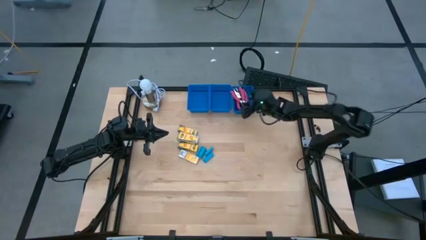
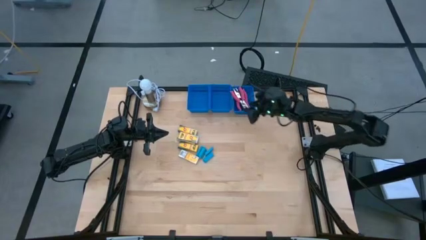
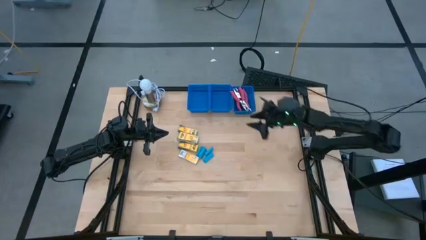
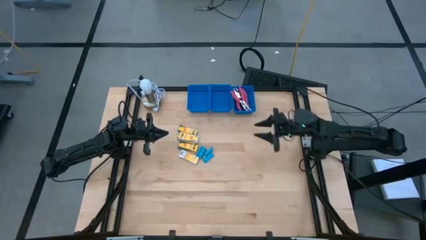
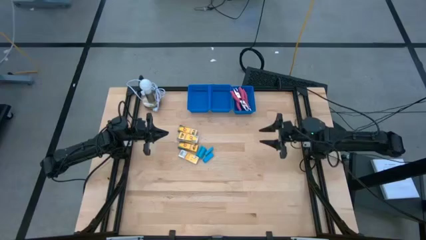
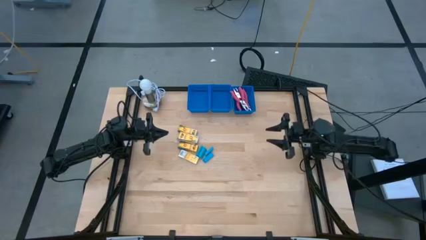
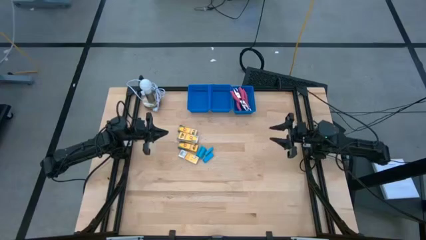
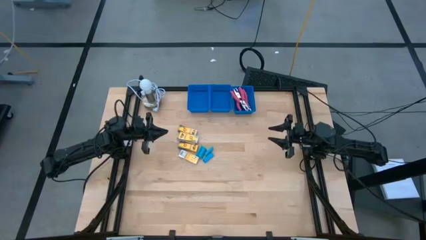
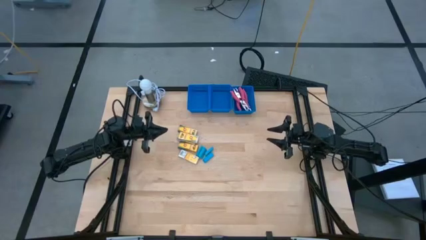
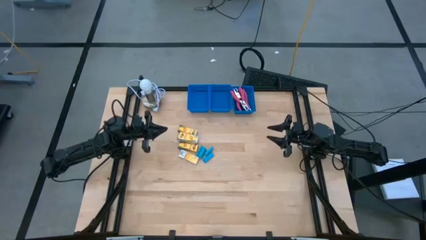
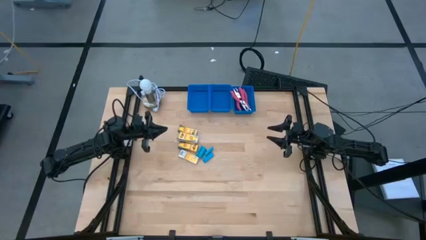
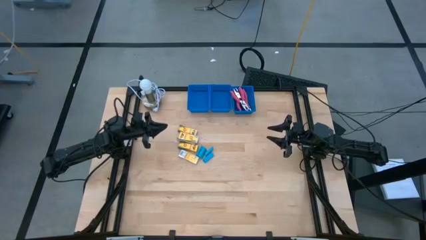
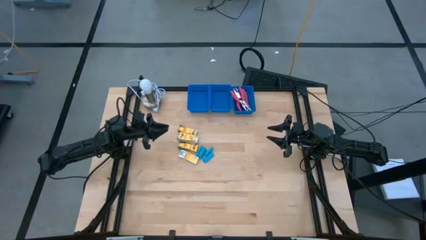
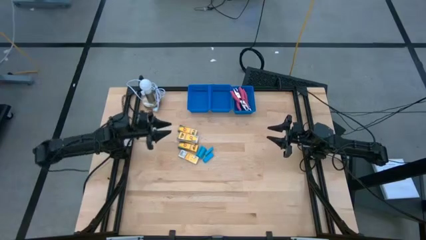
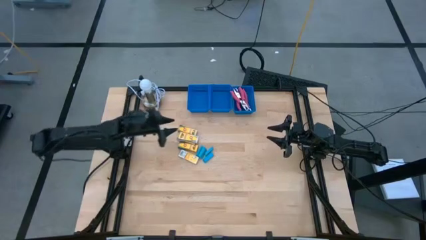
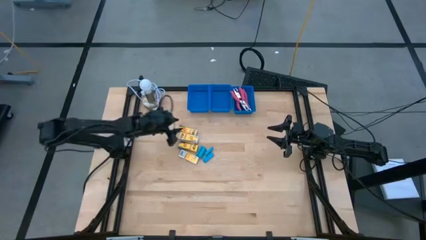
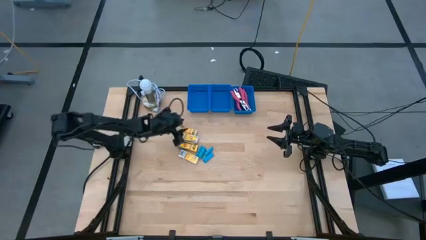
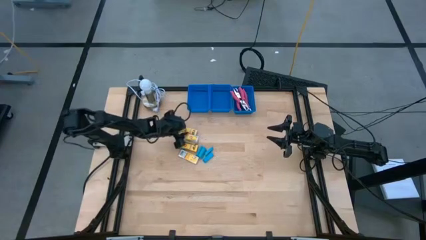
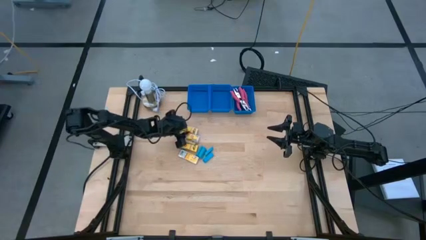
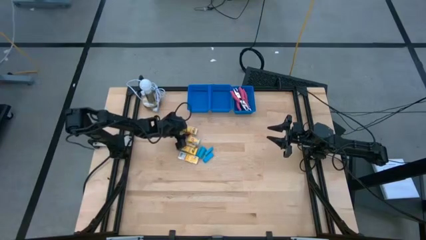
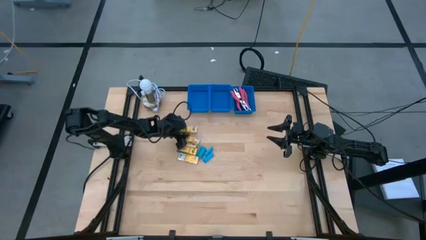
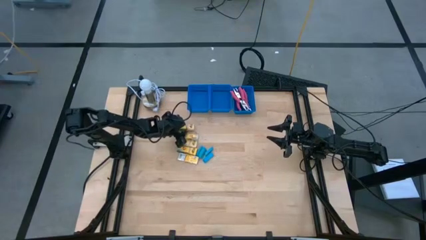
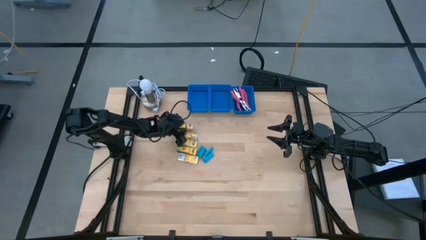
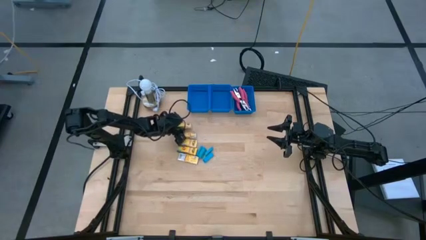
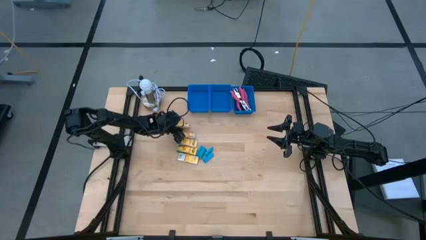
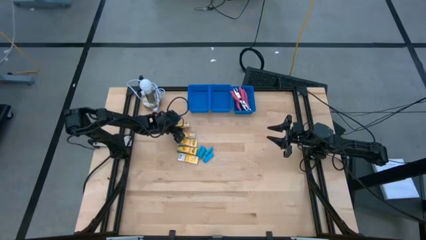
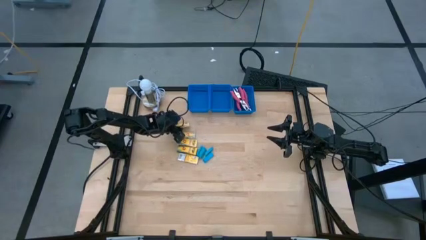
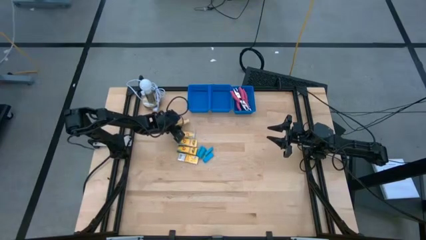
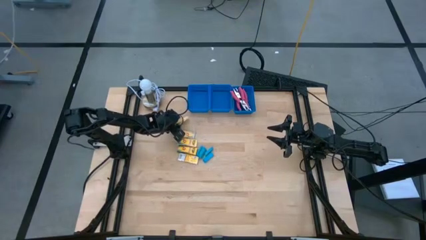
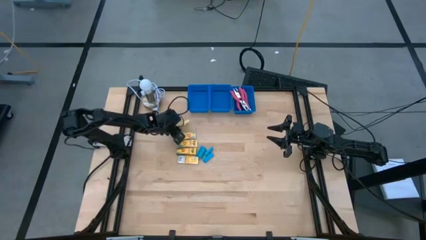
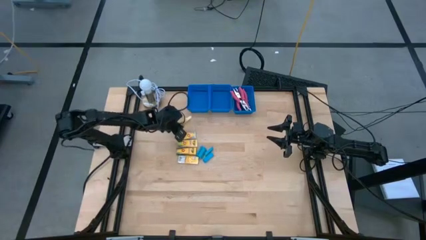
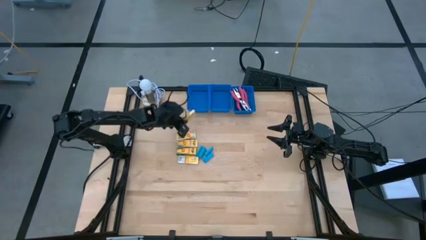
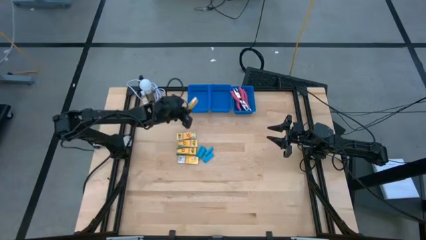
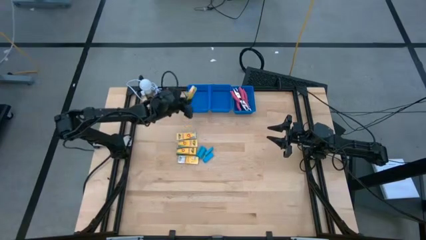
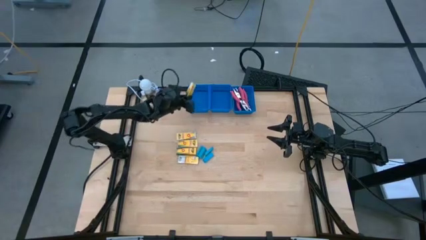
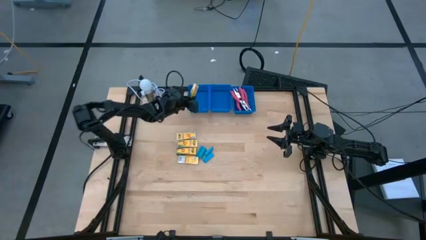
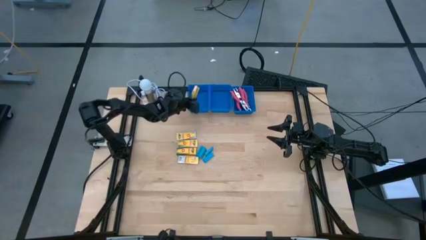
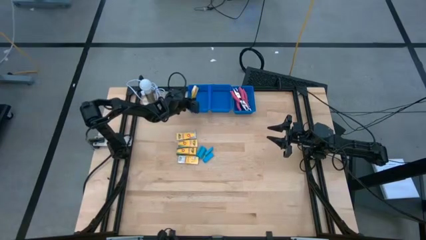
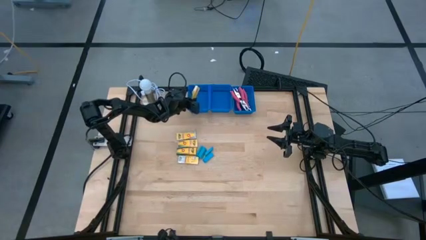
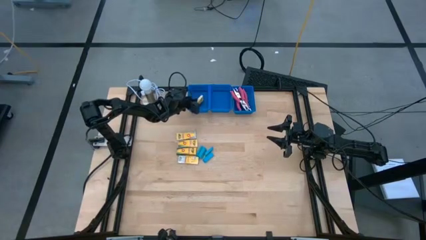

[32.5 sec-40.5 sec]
Task: Pick & Place School Supplies
Put the crayon box into the left blue bin

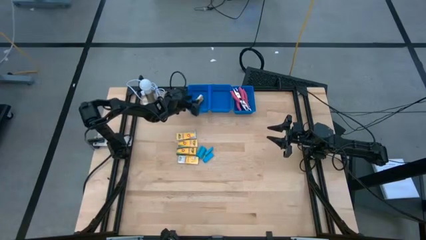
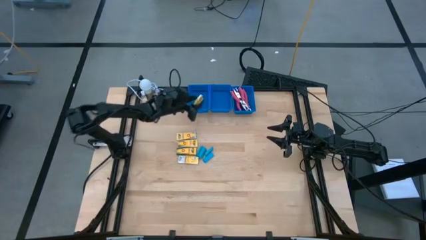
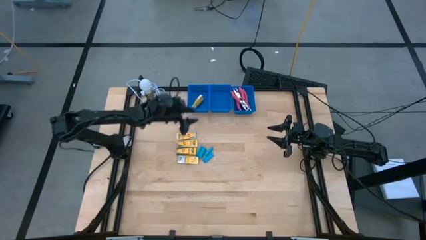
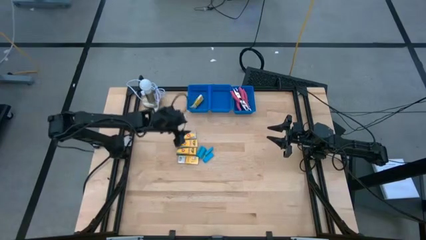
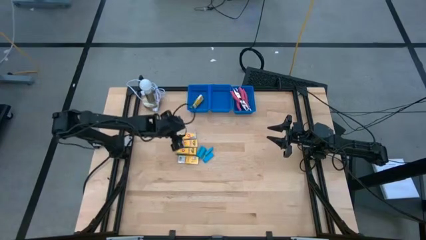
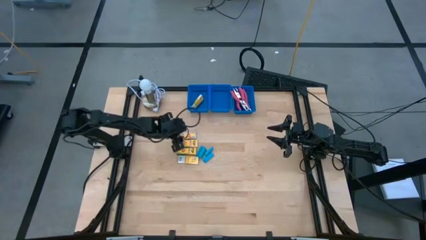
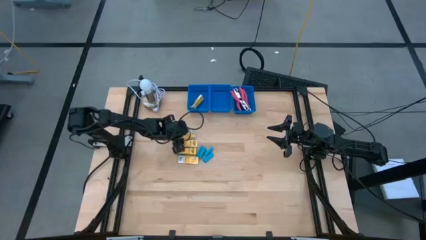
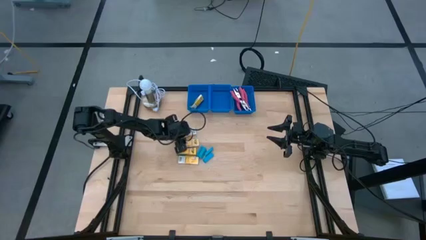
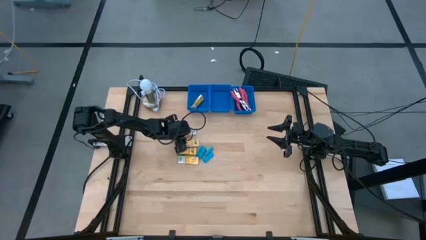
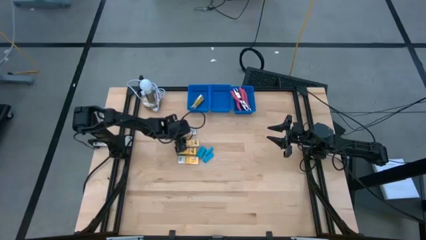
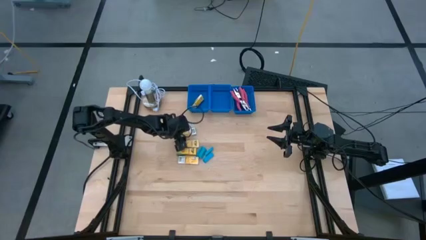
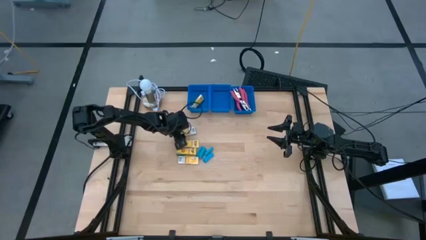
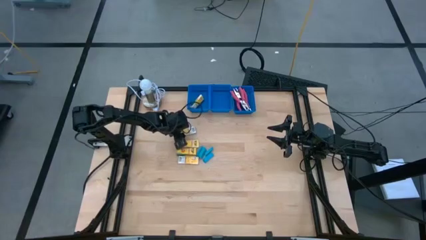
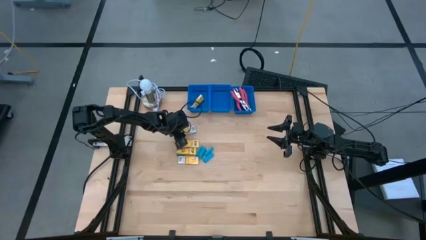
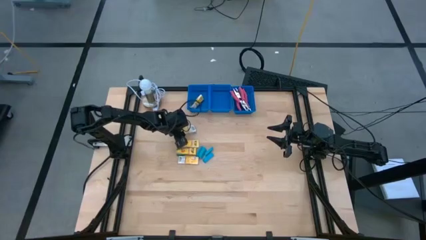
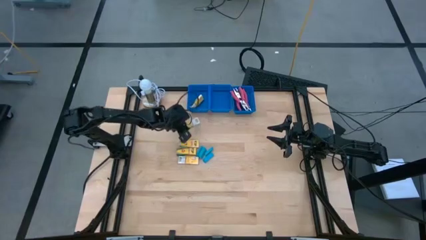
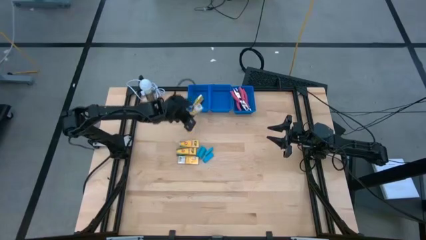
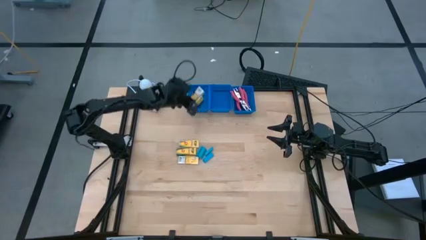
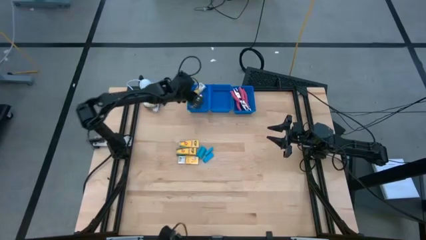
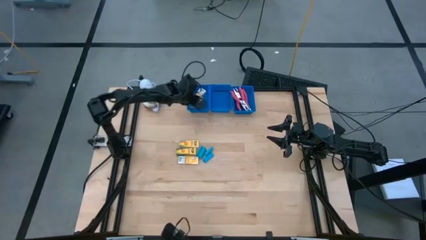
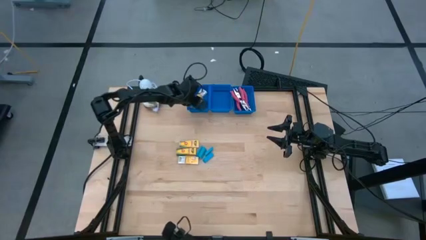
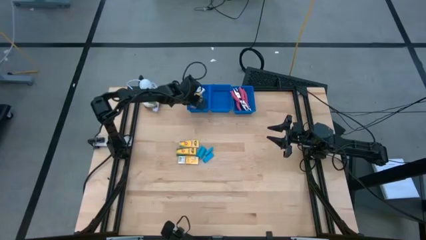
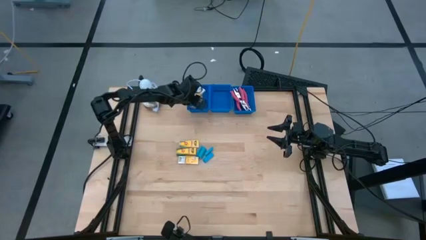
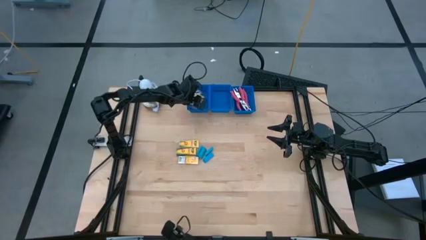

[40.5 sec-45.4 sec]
Put the crayon box into the left blue bin

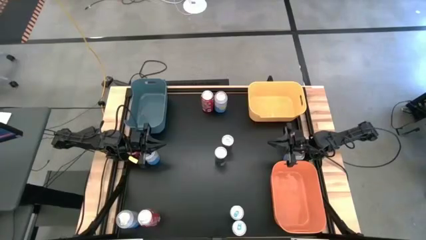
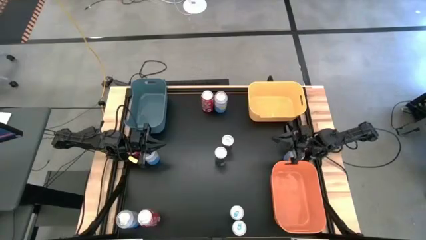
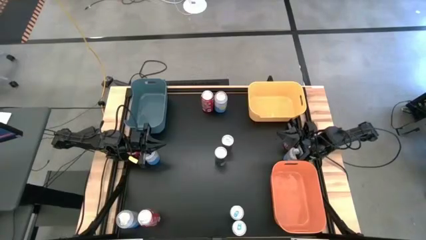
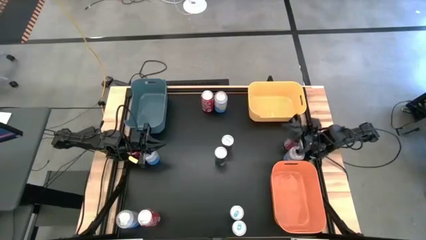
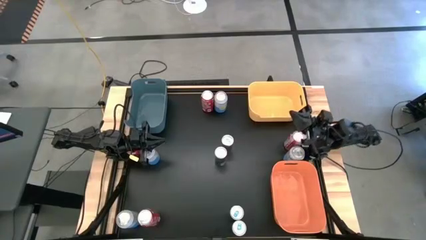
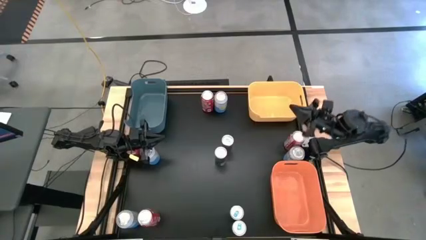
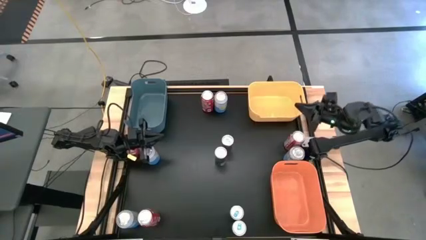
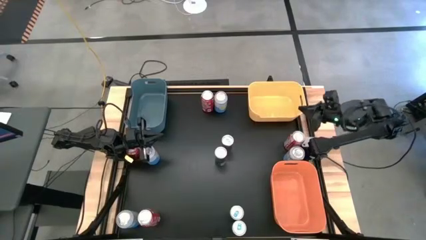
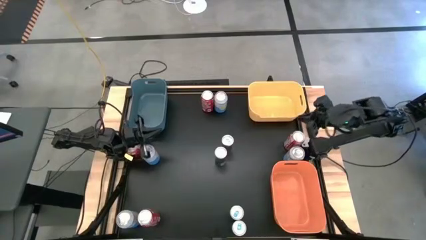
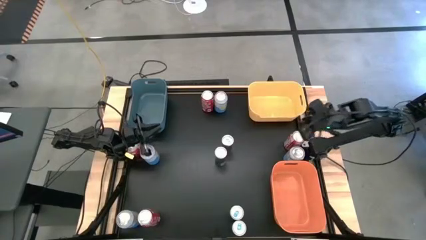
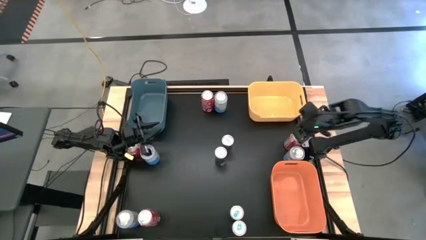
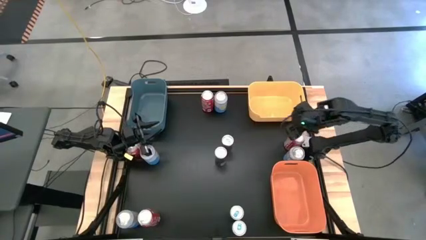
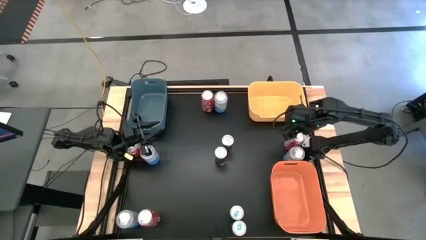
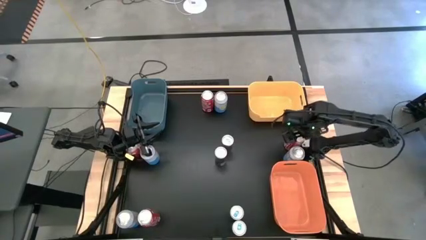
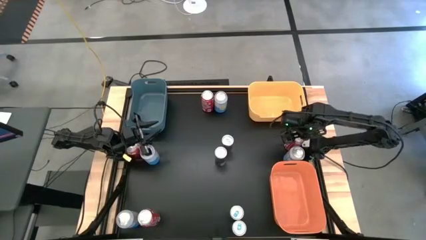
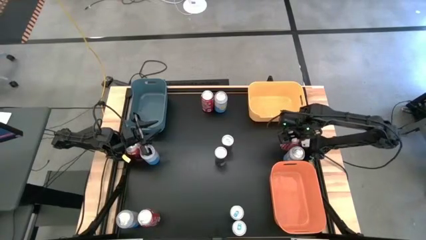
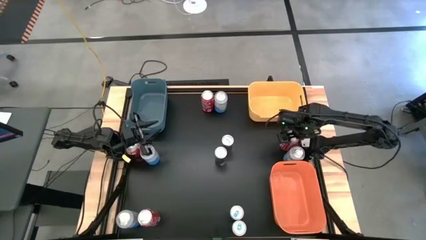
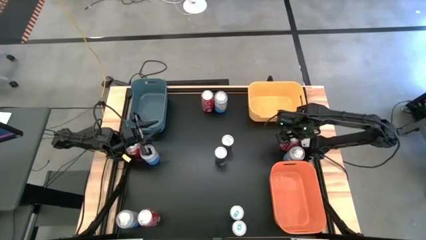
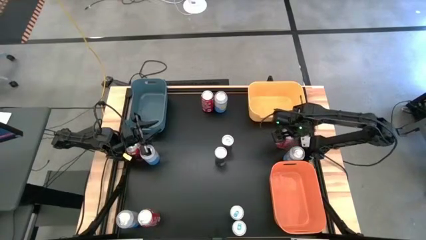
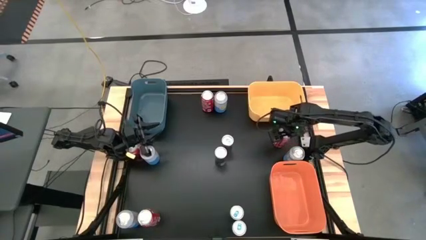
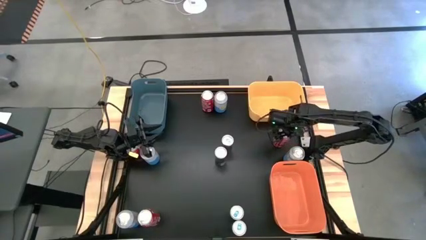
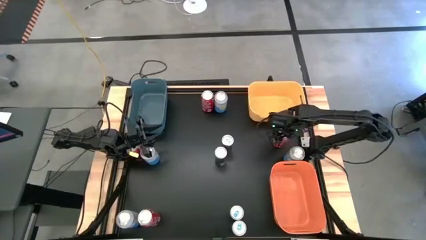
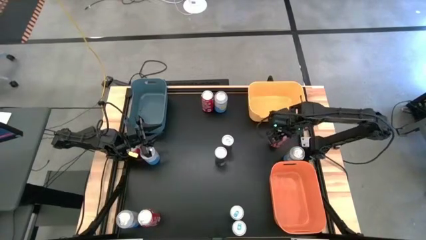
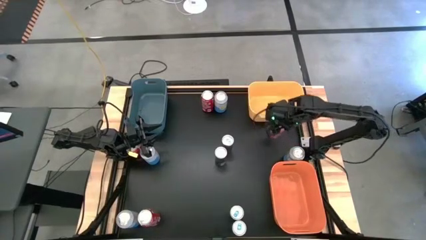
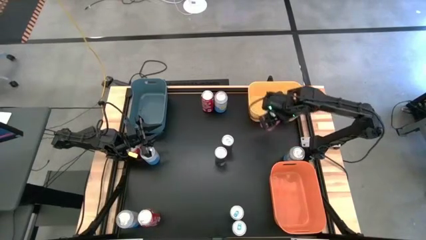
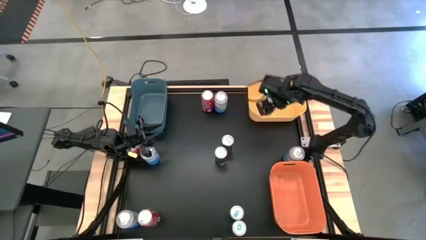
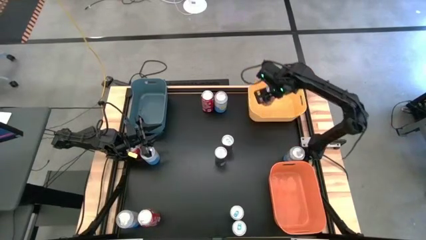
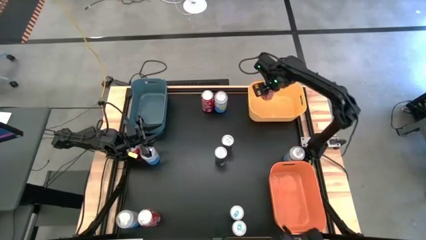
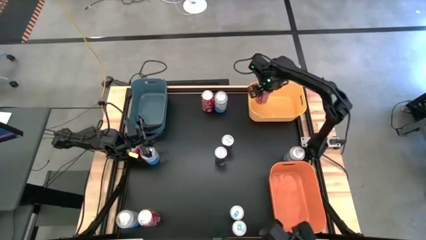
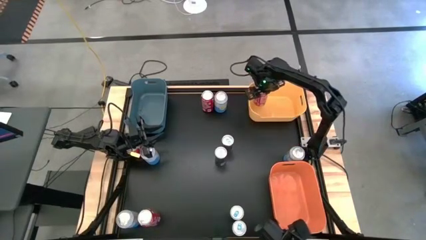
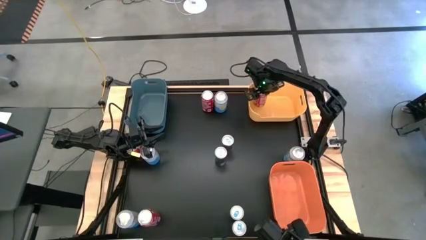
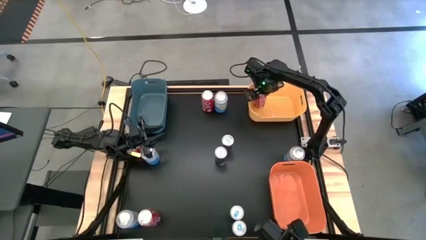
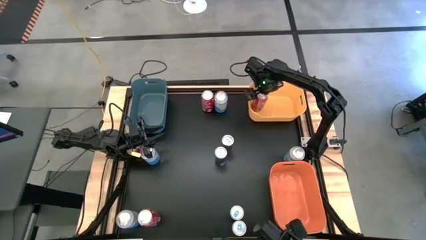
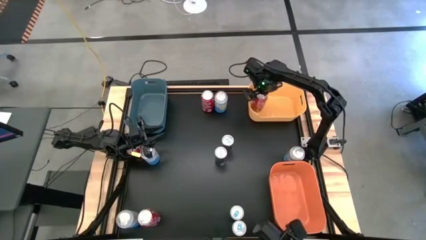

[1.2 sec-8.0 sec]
Task: Sort soda cans
Put the middle right red soda can into the yellow bin
